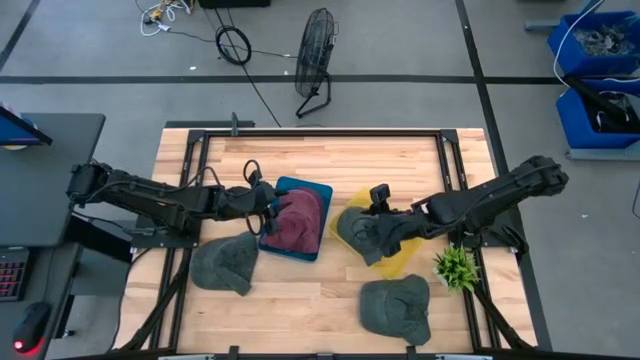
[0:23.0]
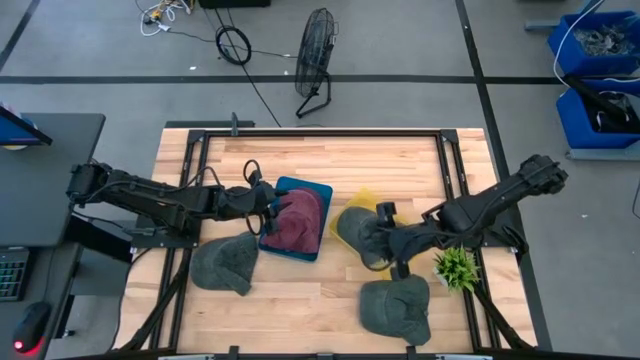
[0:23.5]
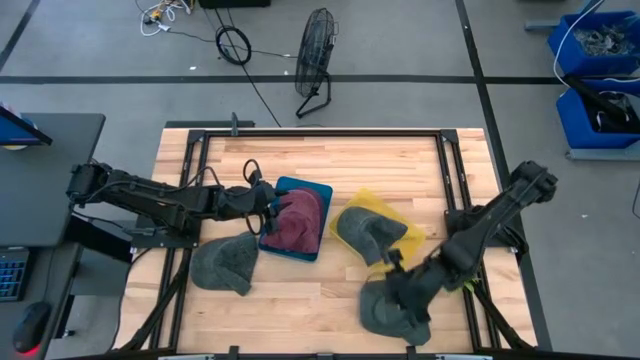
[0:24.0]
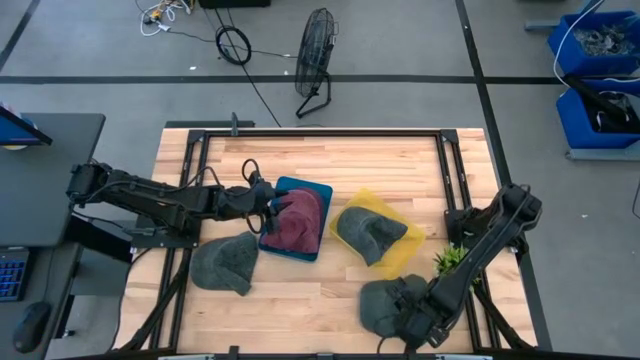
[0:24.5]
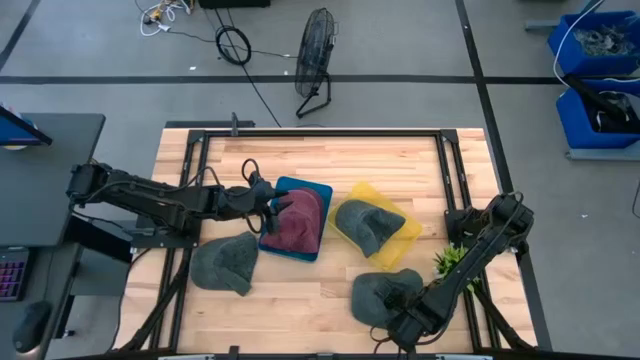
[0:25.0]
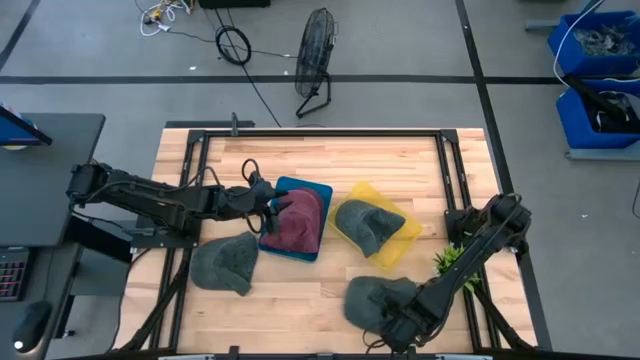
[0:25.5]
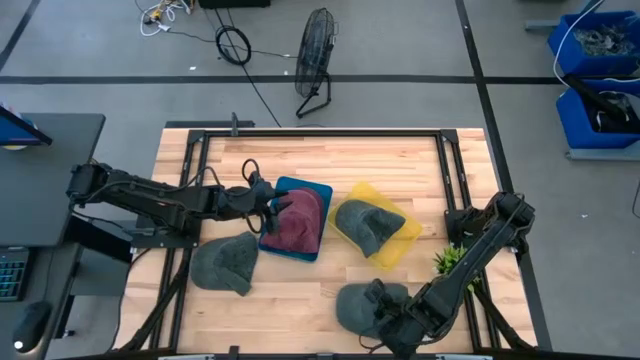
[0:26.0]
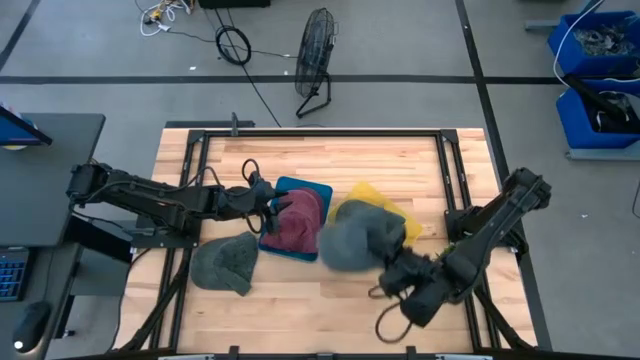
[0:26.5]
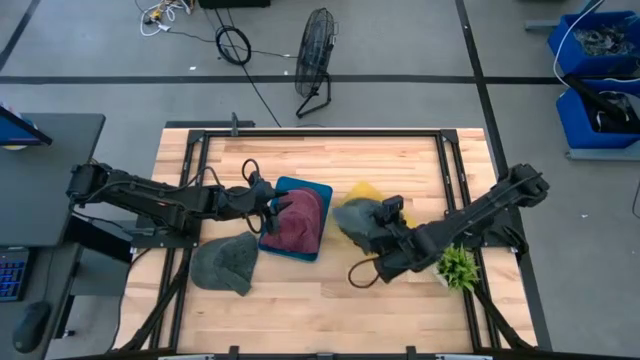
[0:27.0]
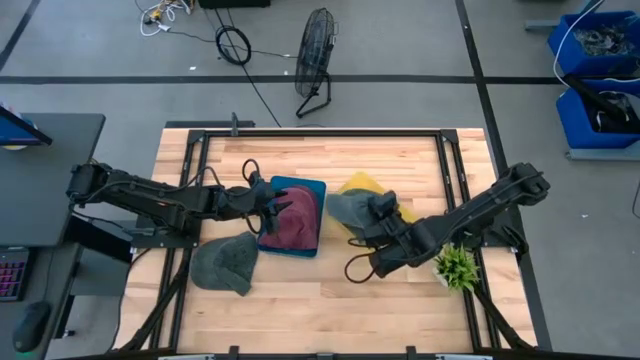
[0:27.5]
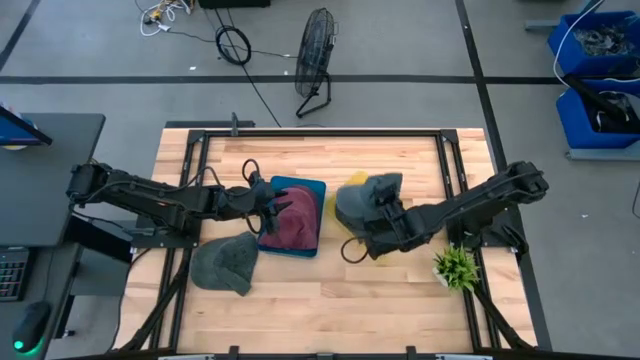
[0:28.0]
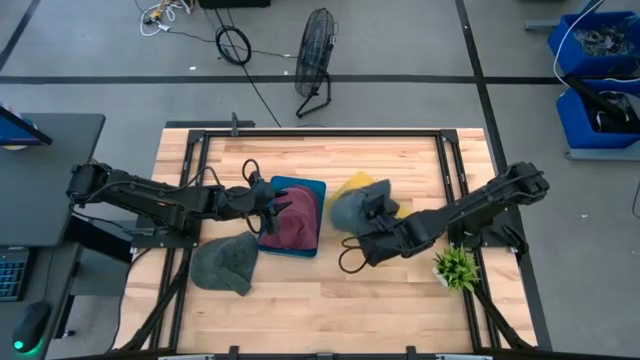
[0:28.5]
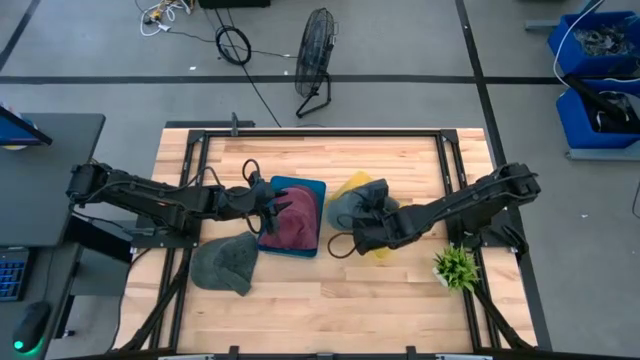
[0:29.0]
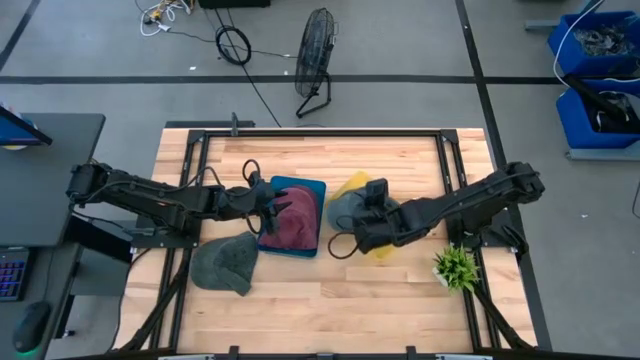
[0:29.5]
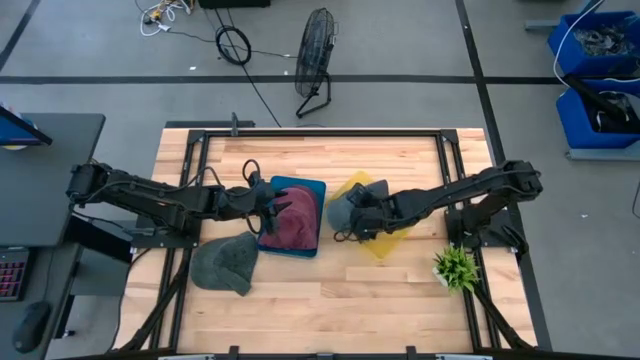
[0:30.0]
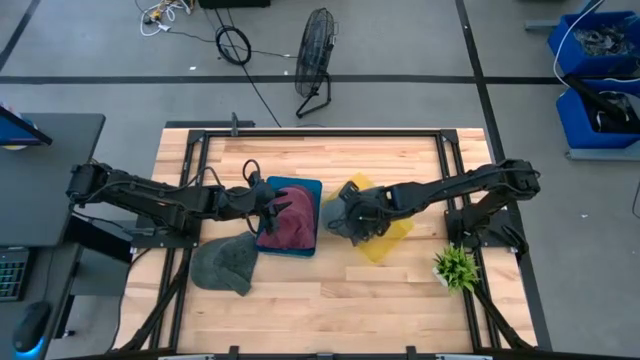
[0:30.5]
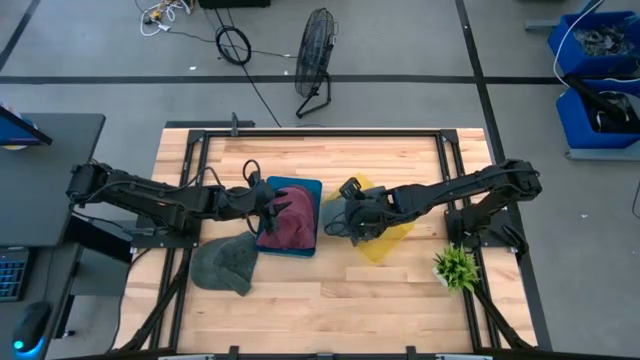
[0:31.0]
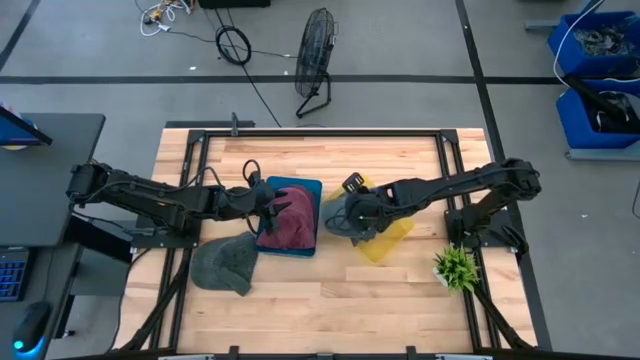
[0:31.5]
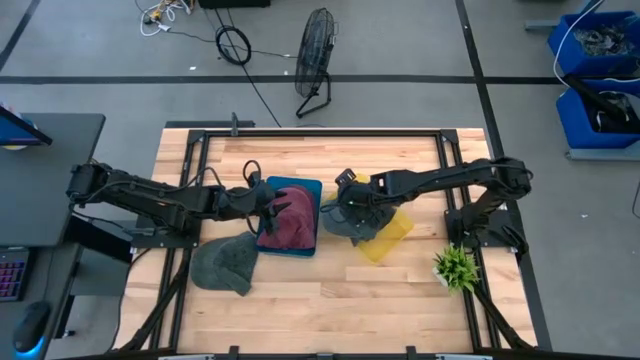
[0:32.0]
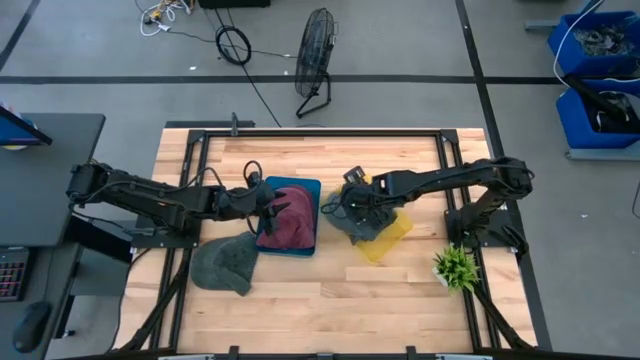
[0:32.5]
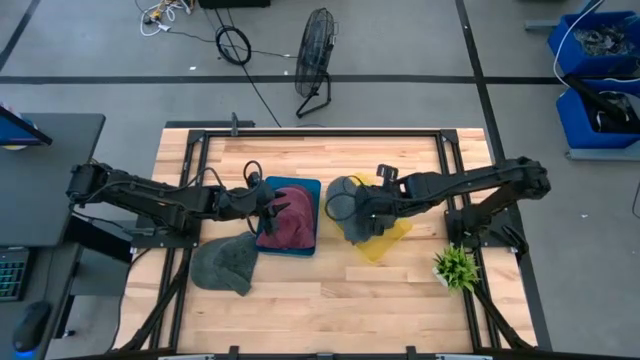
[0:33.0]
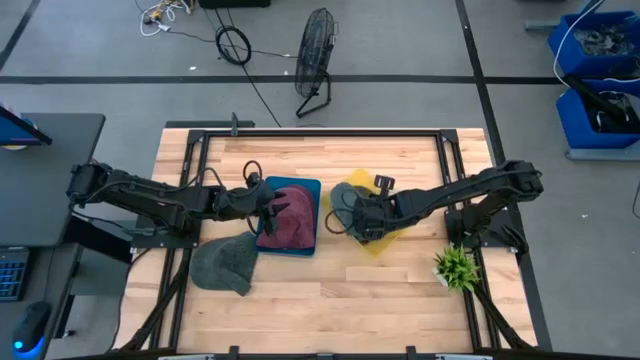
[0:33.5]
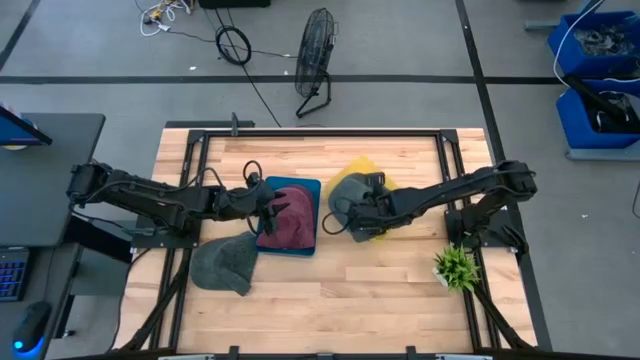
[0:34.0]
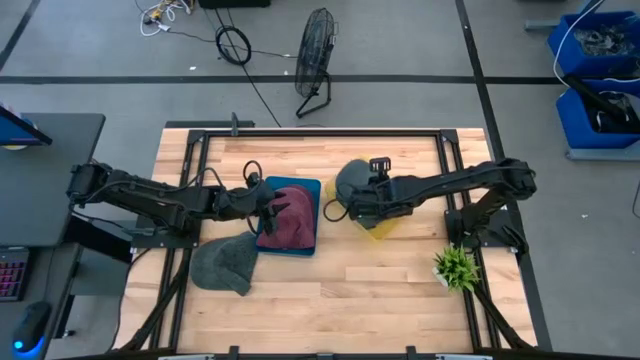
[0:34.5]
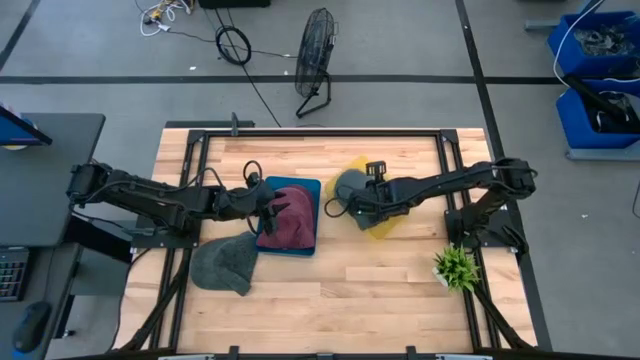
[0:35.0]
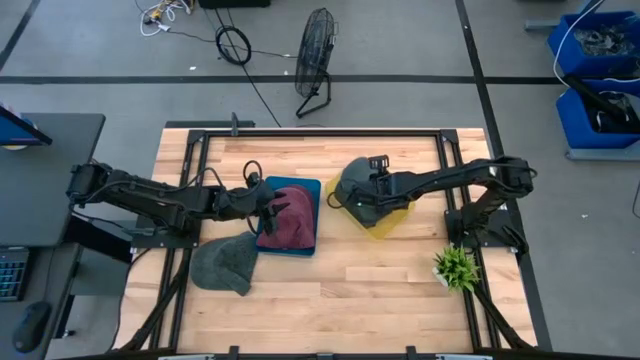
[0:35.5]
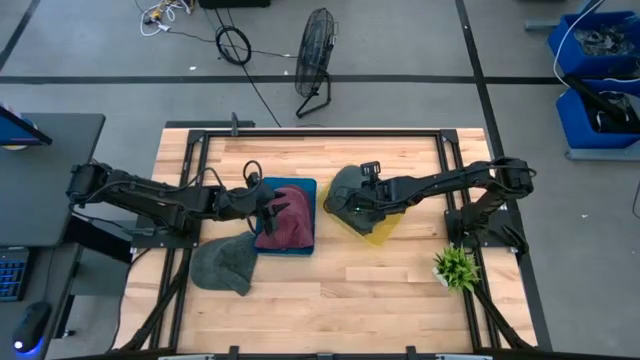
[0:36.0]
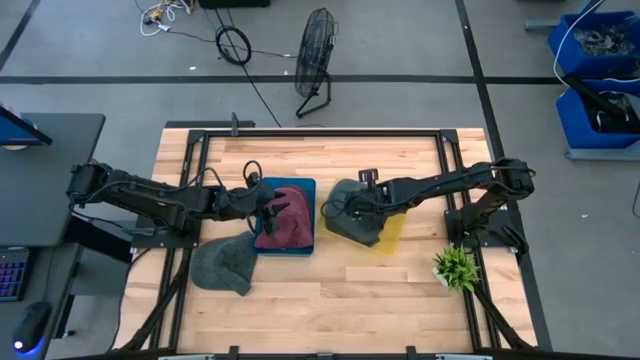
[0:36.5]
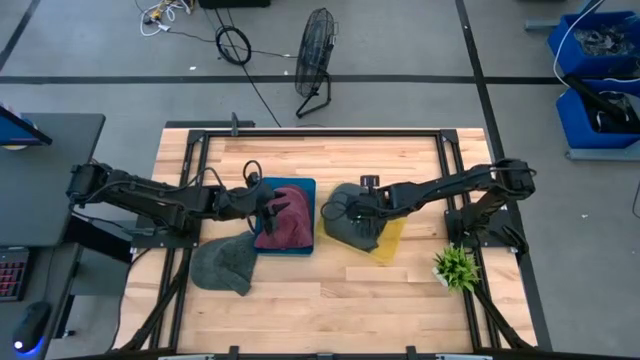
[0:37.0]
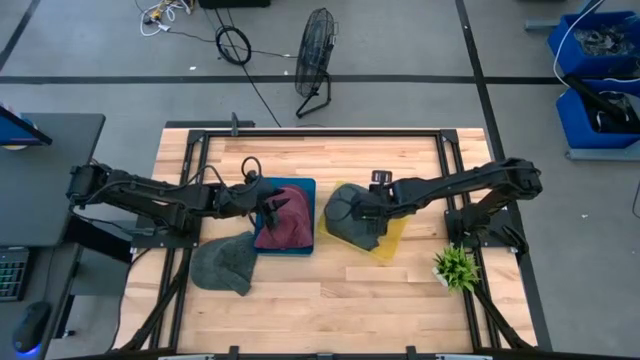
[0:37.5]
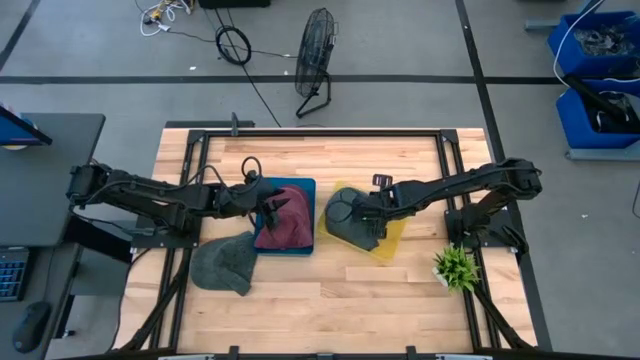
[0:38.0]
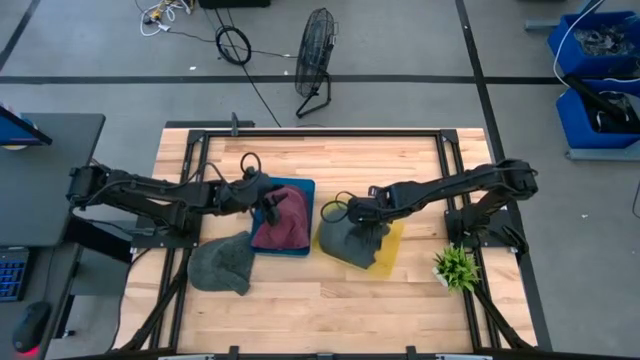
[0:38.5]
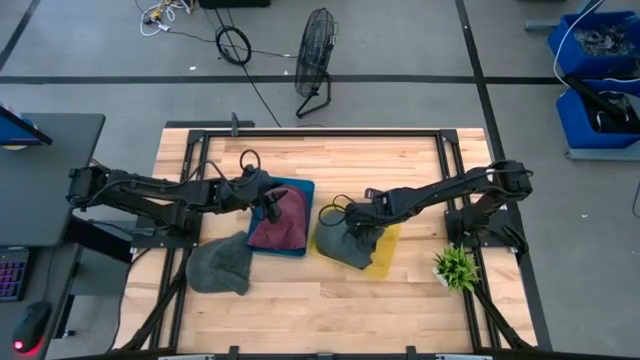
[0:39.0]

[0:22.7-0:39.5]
Task: Pick & Place hat
Put the bottom gray cap into the yellow bin

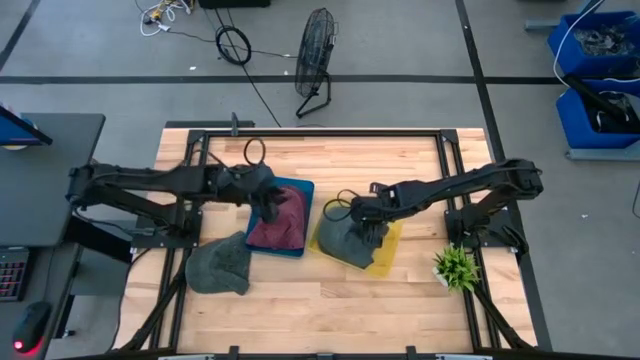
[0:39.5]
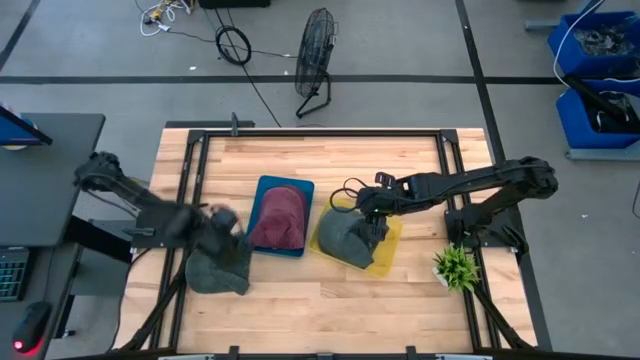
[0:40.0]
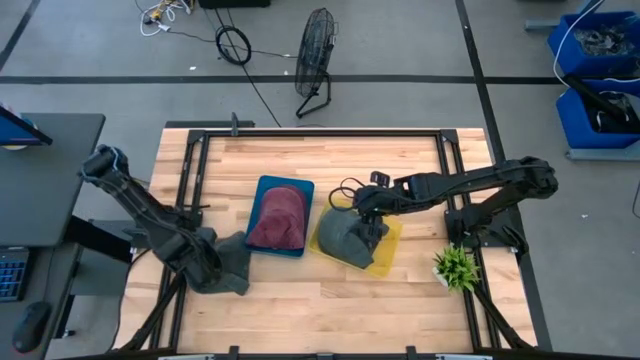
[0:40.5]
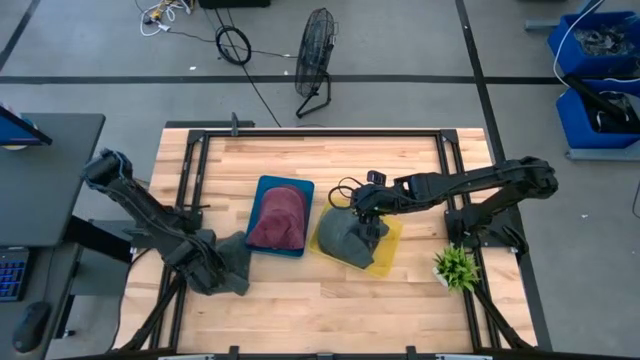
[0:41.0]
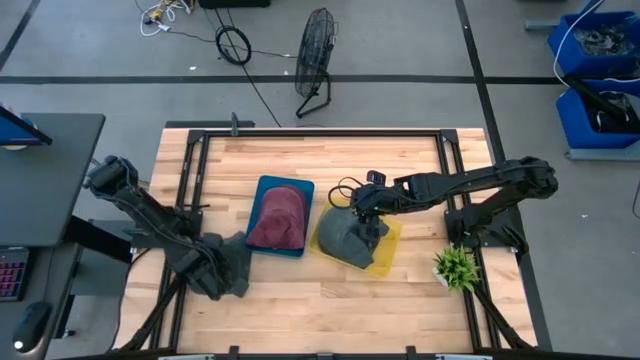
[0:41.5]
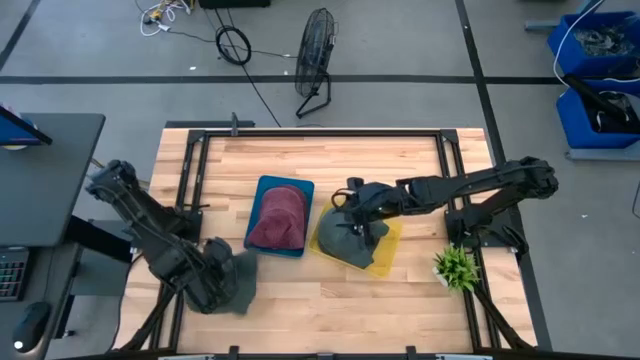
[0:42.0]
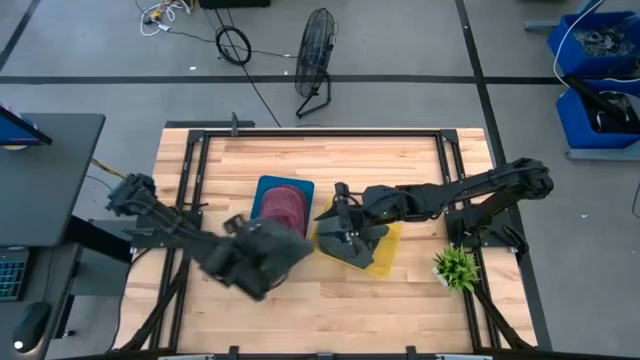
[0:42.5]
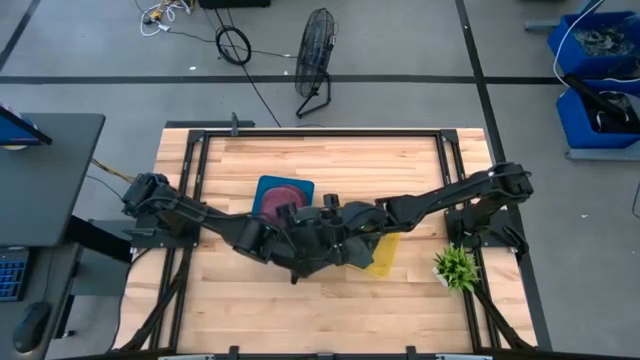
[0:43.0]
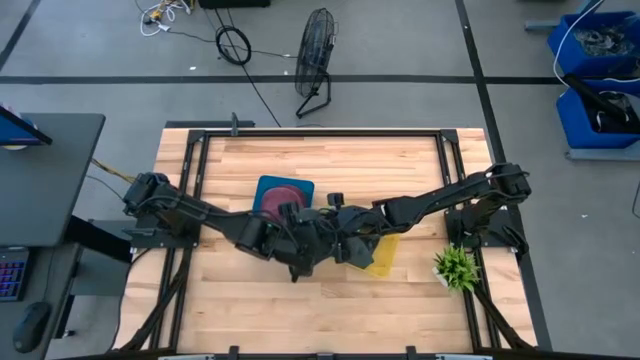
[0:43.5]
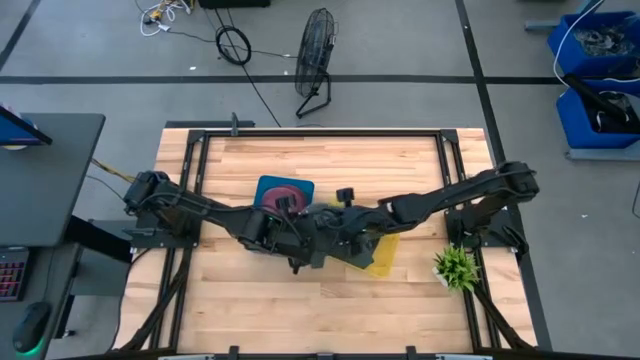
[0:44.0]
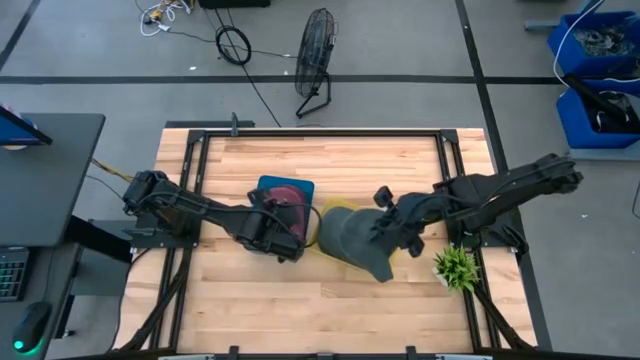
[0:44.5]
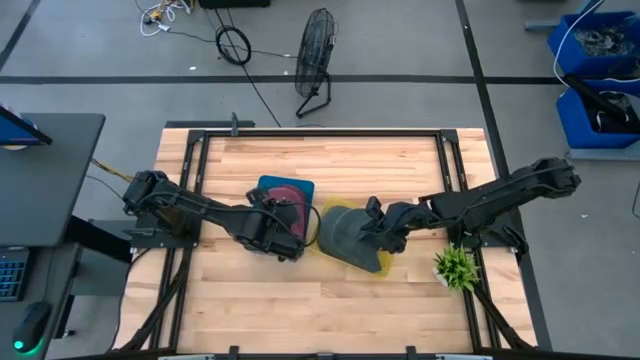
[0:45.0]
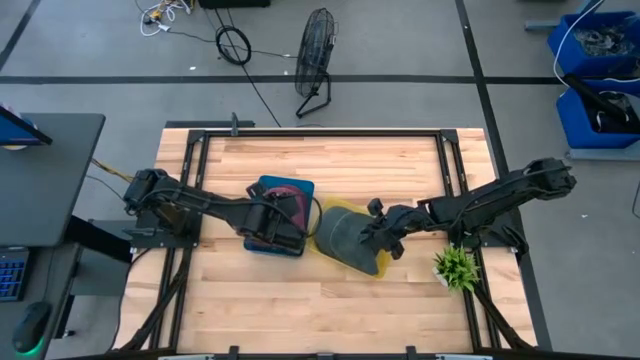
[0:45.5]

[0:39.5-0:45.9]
Put the gray cap into the yellow bin
